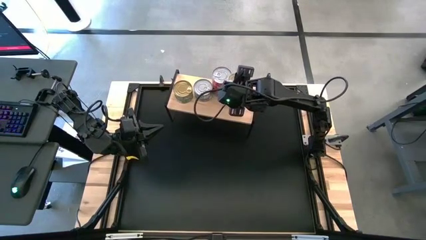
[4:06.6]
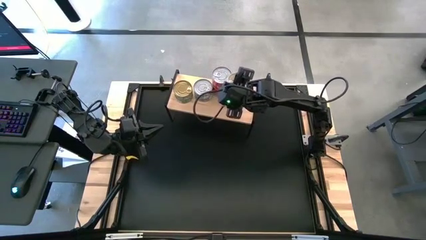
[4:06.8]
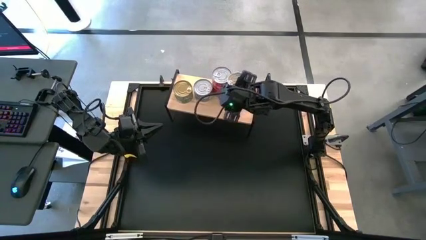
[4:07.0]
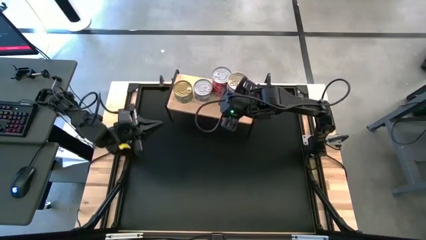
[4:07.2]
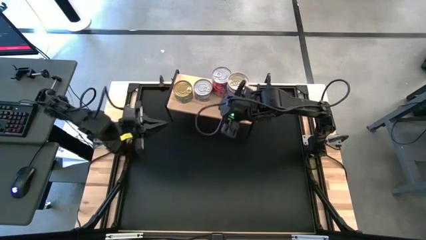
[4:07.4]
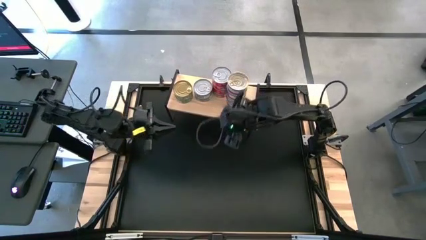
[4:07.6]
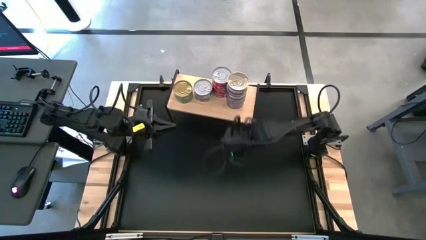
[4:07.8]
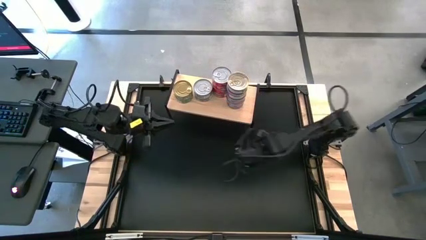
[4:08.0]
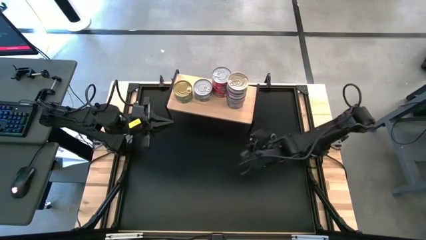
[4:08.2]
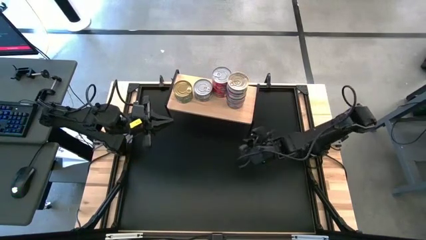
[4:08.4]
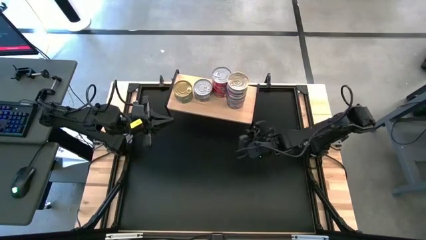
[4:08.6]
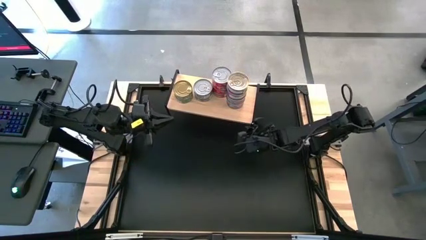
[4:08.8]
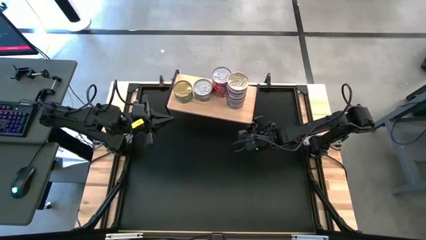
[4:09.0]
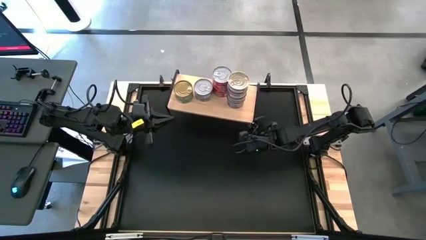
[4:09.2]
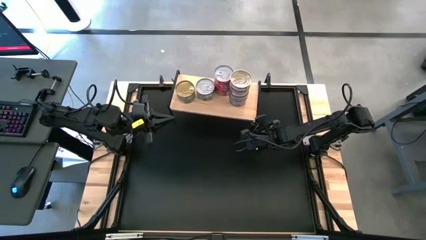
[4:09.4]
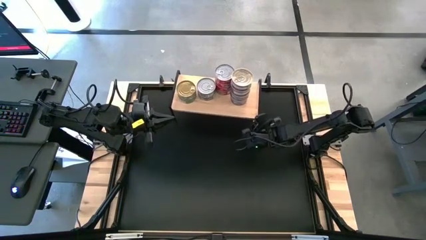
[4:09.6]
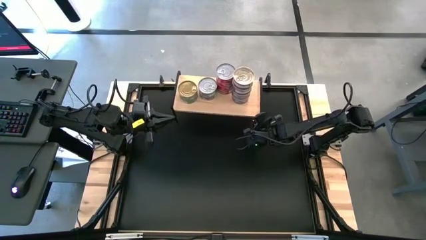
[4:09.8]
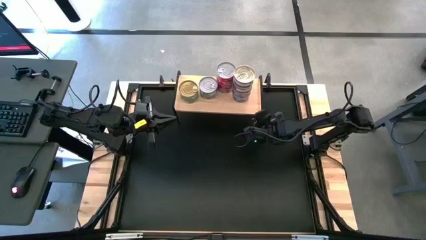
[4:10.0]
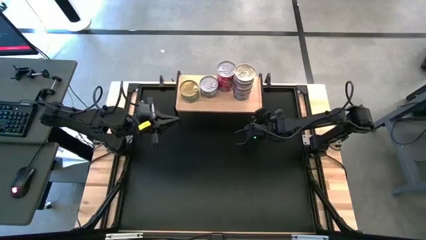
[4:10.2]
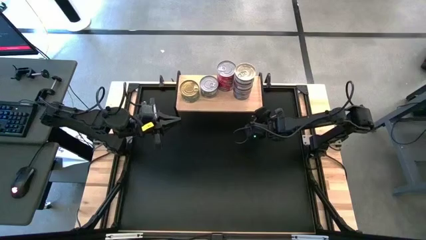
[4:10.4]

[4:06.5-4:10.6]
Task: Stack canned seafood by type on shelf
Adjust the shelf

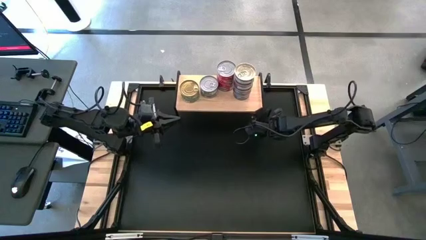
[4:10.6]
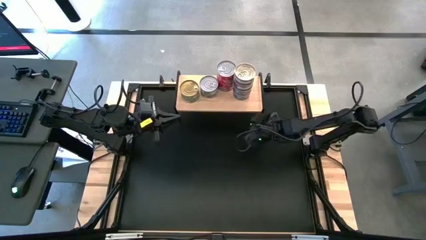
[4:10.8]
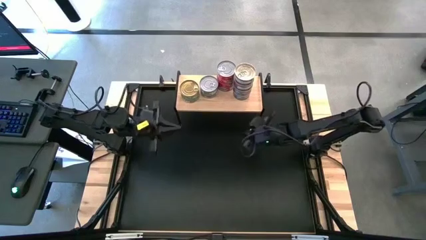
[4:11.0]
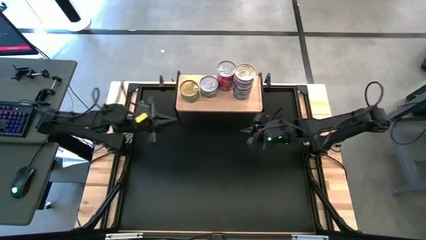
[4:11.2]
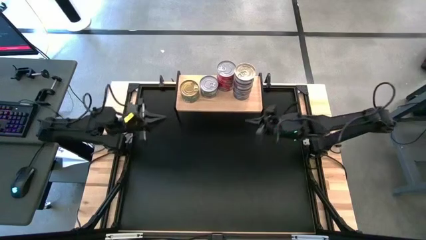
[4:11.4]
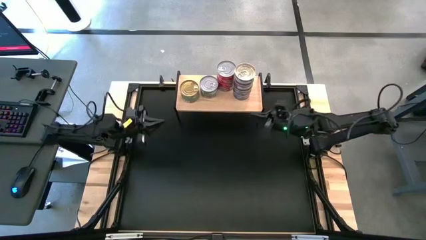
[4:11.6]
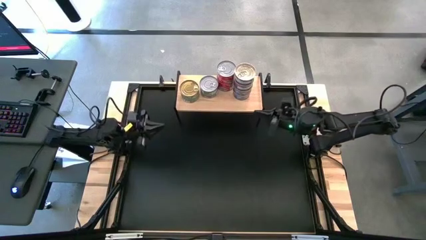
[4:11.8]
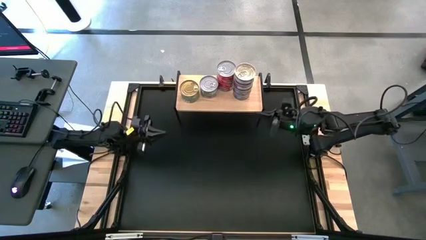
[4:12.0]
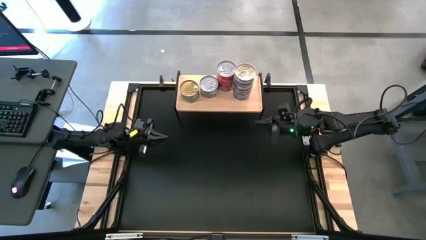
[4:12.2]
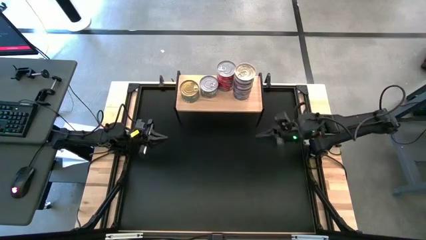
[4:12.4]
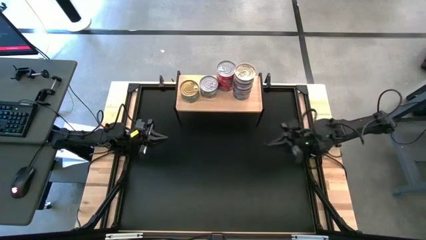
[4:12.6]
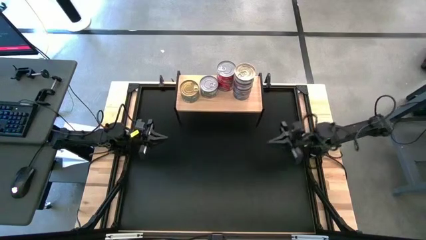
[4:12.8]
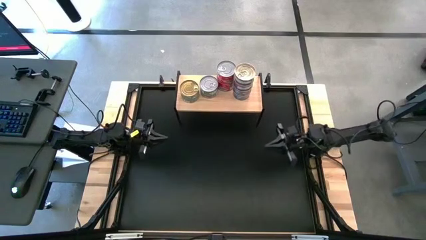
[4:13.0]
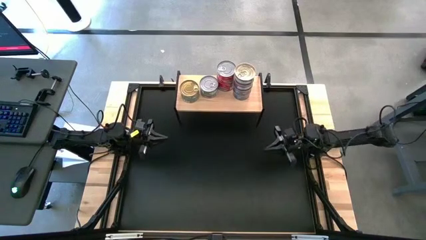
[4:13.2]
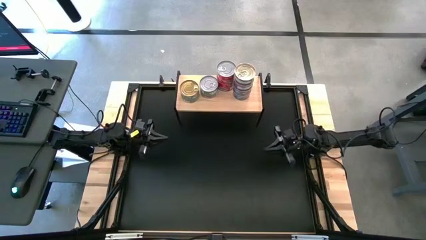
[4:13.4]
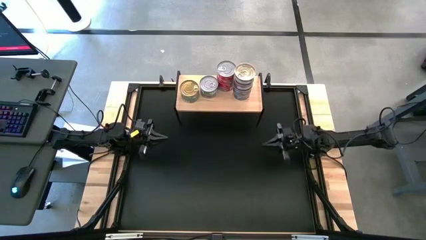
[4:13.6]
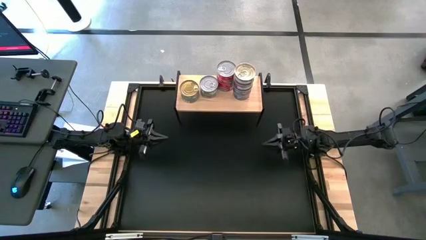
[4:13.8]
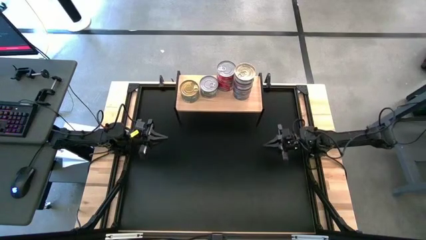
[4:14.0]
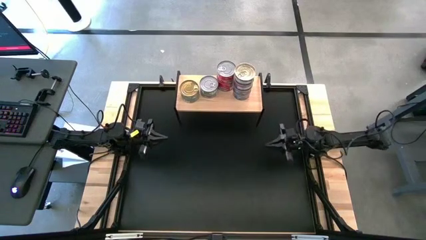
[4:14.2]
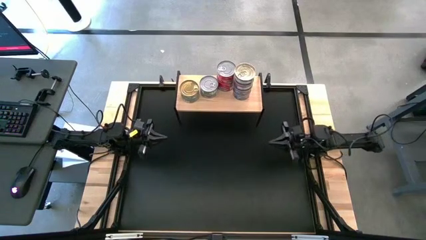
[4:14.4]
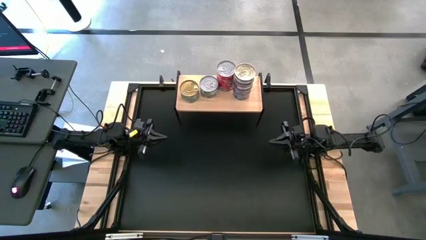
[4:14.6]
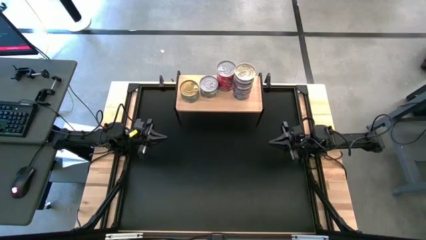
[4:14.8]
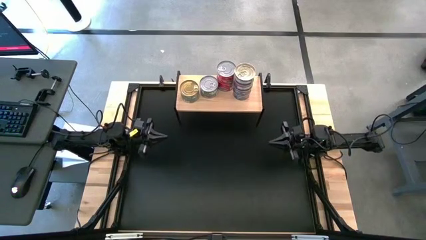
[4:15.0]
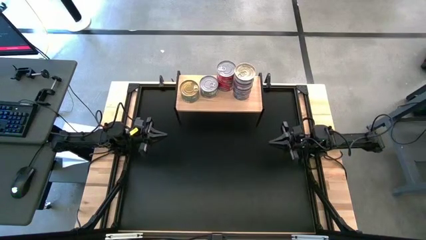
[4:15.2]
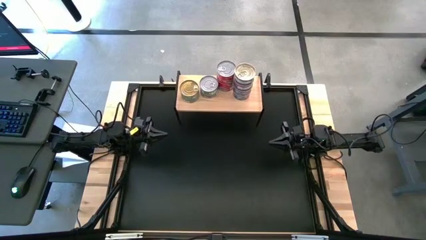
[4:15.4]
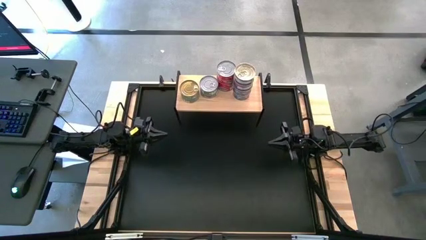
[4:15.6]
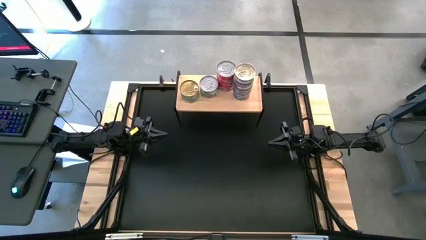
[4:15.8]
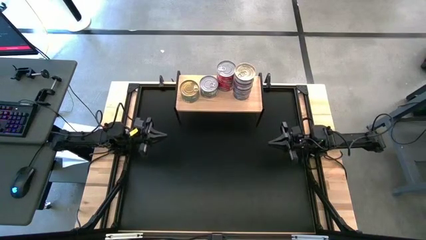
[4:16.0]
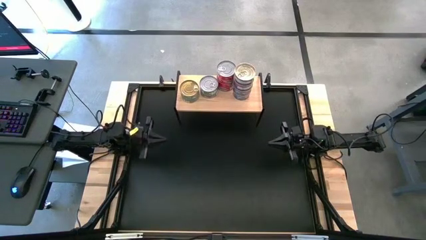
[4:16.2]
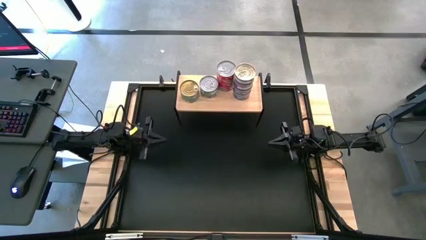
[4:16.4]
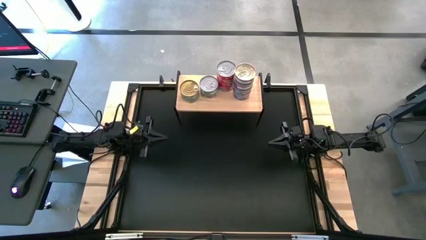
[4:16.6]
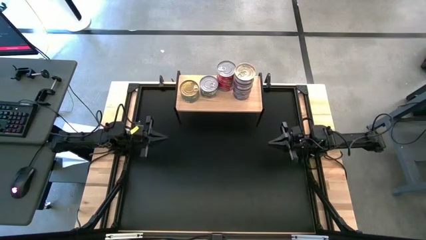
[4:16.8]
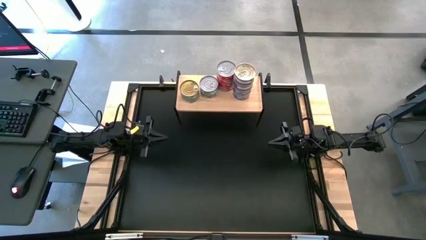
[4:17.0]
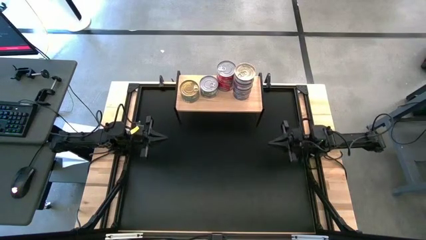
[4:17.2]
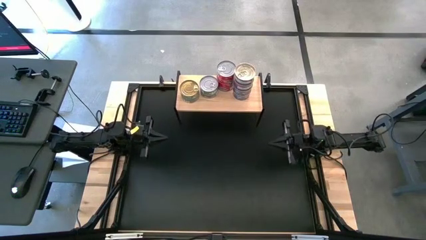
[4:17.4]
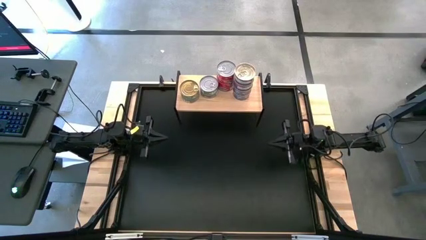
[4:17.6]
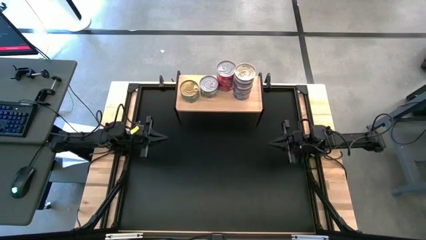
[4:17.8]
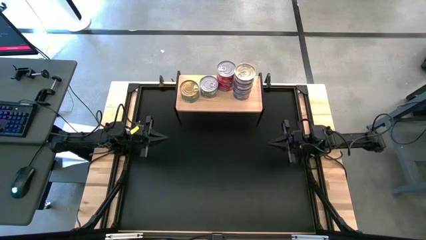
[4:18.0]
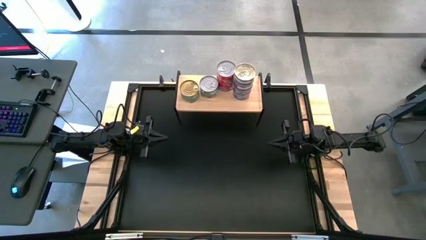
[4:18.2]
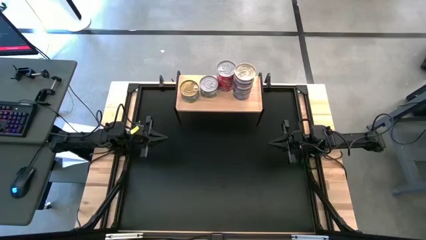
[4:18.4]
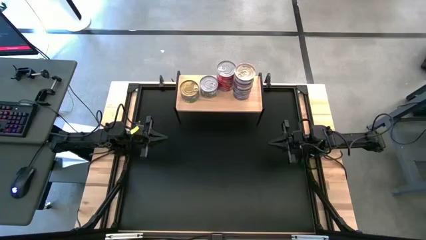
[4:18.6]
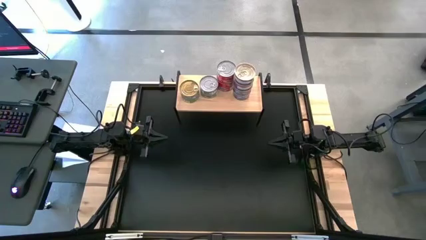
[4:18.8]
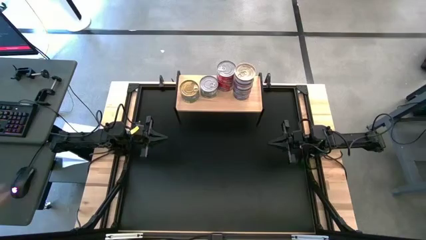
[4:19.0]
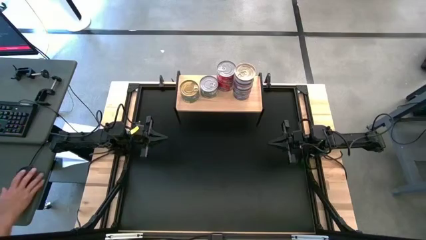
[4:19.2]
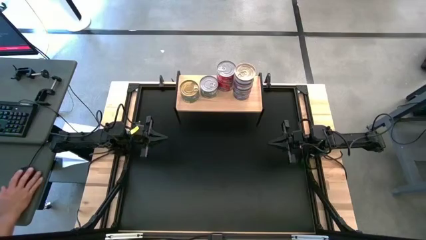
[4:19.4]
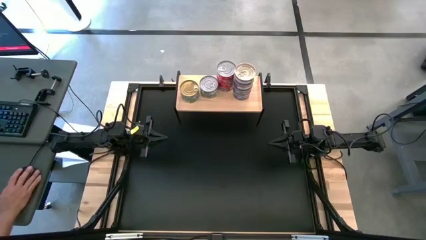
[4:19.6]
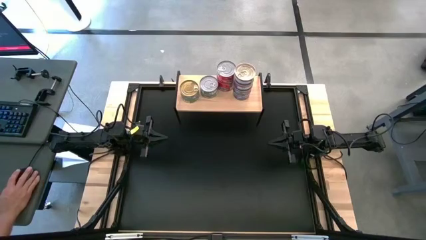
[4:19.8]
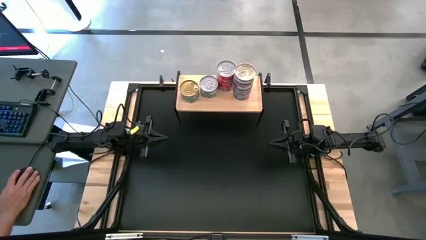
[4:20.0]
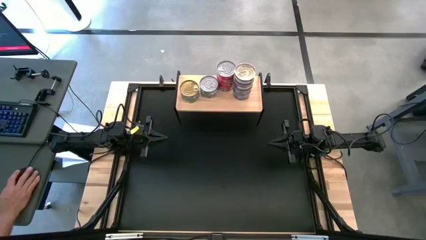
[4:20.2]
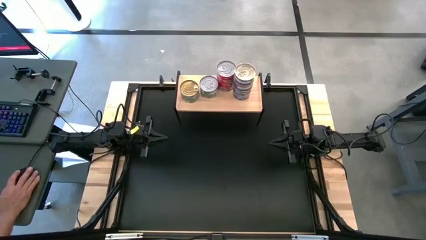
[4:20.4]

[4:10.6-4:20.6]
Return to Home Position
